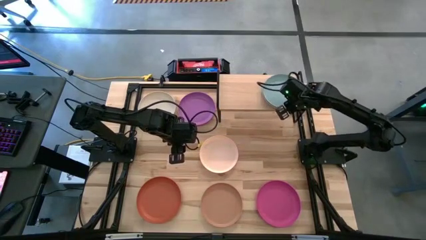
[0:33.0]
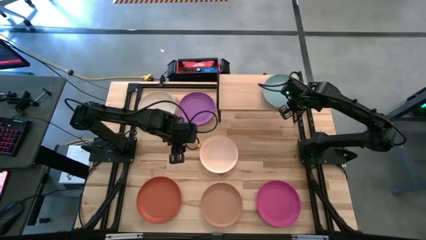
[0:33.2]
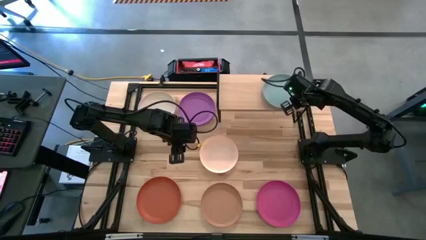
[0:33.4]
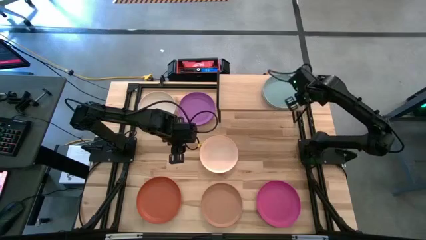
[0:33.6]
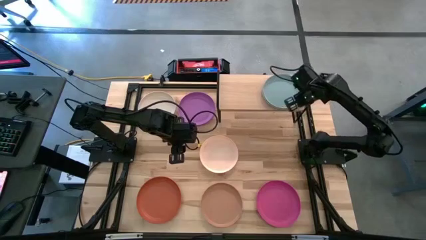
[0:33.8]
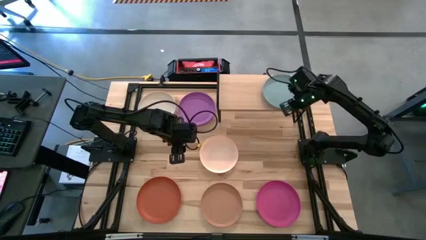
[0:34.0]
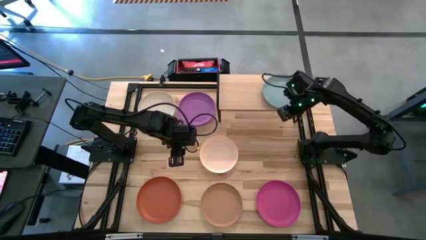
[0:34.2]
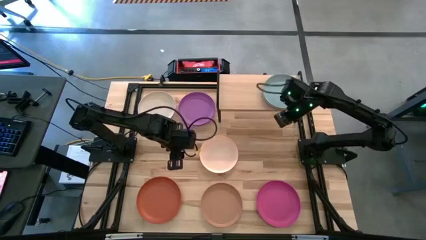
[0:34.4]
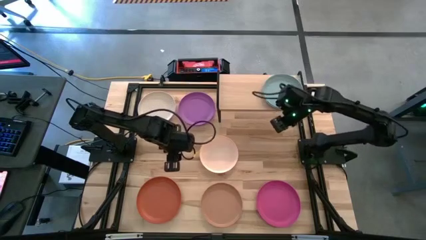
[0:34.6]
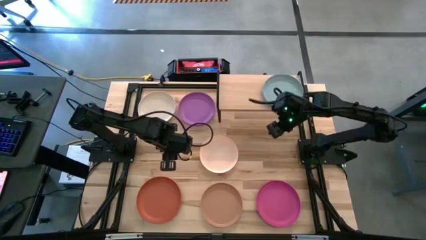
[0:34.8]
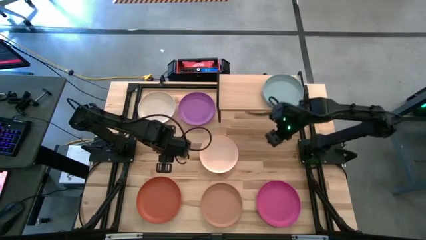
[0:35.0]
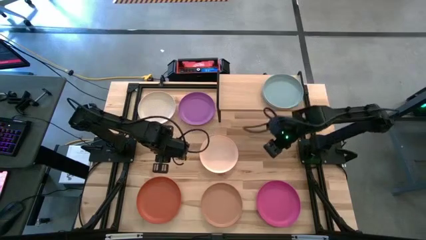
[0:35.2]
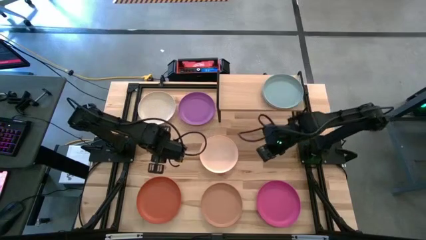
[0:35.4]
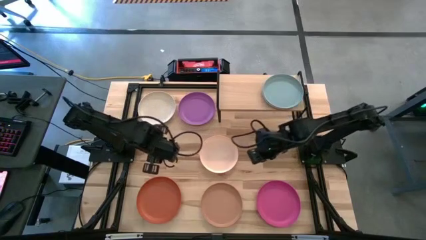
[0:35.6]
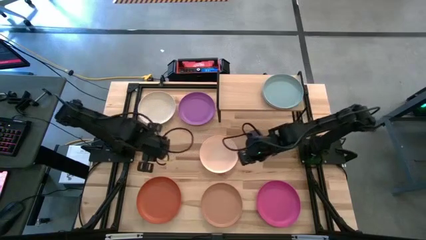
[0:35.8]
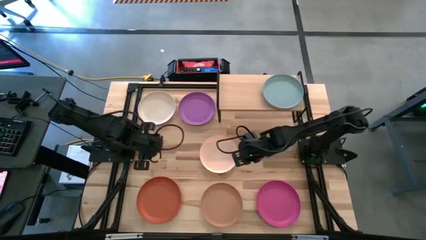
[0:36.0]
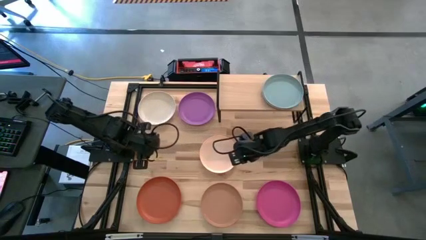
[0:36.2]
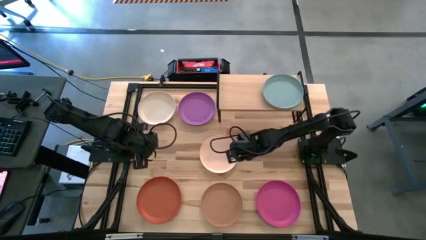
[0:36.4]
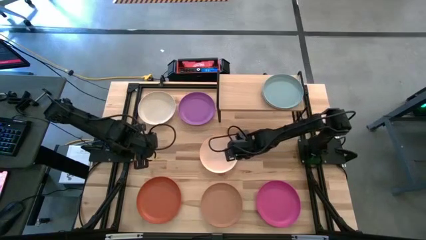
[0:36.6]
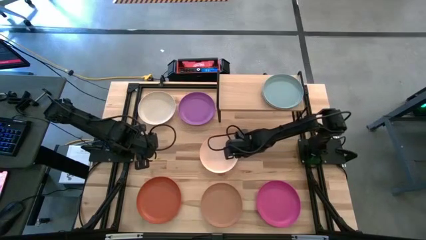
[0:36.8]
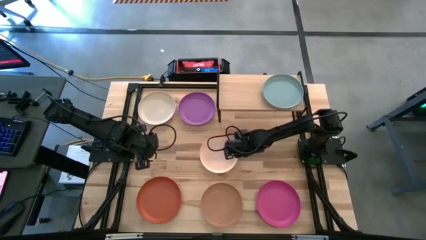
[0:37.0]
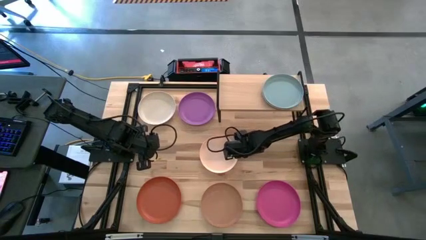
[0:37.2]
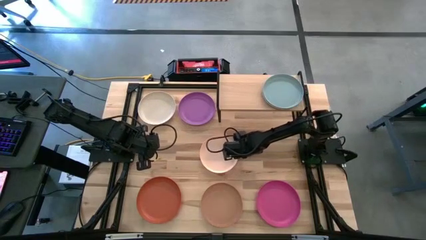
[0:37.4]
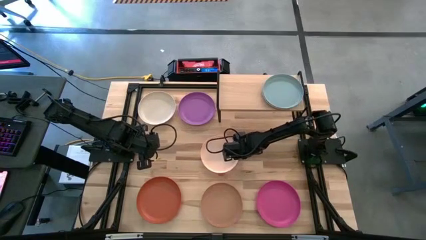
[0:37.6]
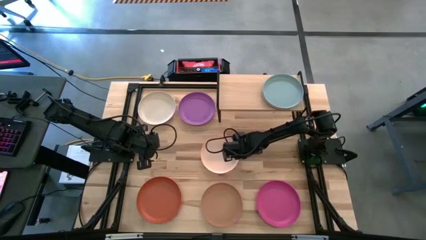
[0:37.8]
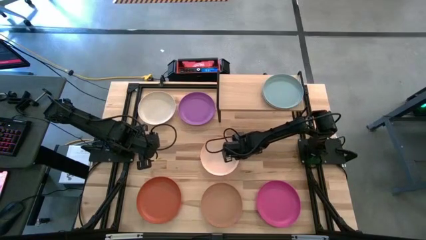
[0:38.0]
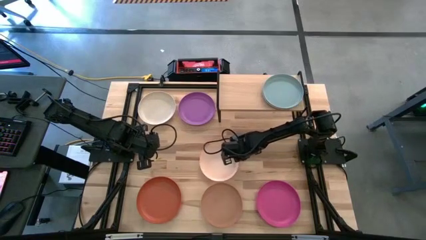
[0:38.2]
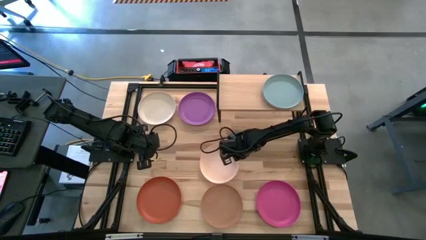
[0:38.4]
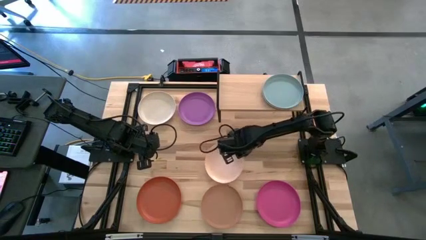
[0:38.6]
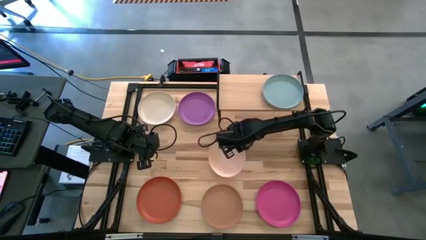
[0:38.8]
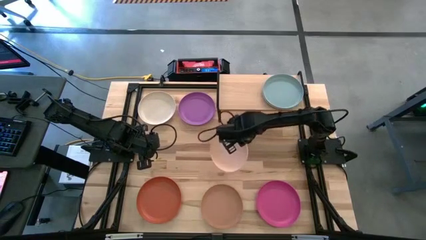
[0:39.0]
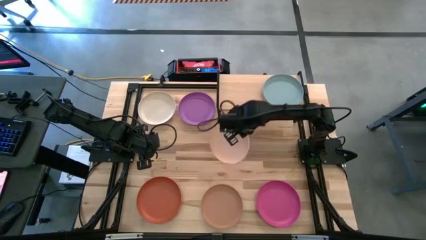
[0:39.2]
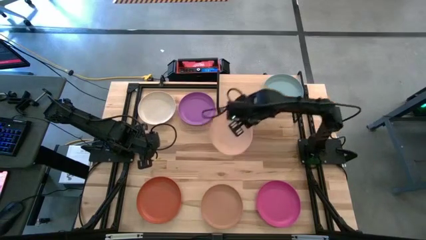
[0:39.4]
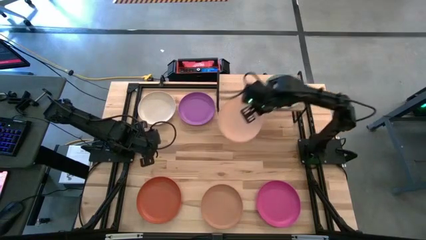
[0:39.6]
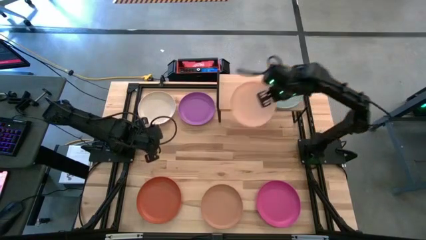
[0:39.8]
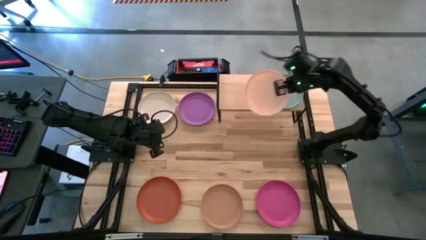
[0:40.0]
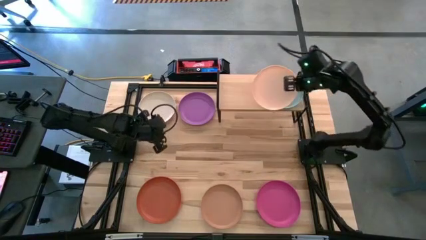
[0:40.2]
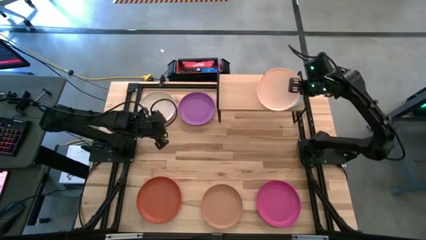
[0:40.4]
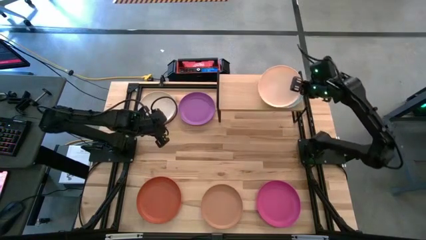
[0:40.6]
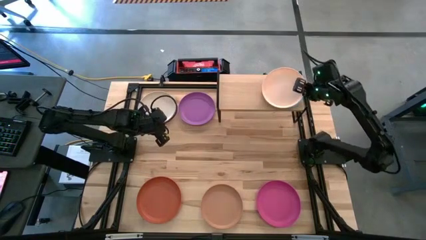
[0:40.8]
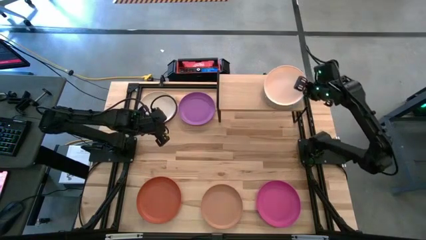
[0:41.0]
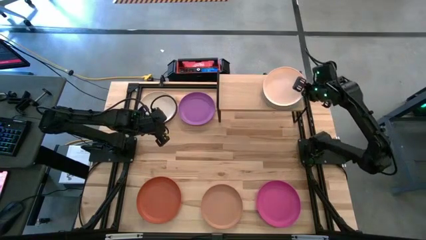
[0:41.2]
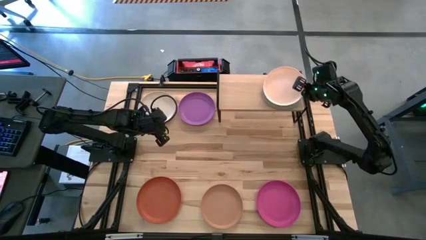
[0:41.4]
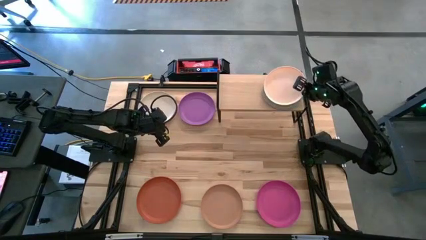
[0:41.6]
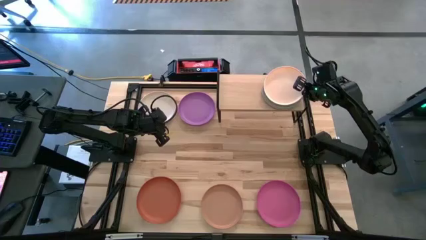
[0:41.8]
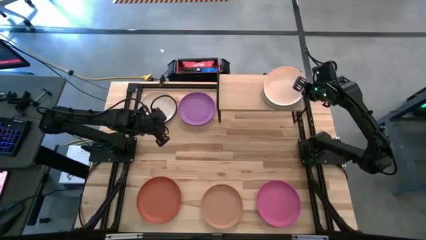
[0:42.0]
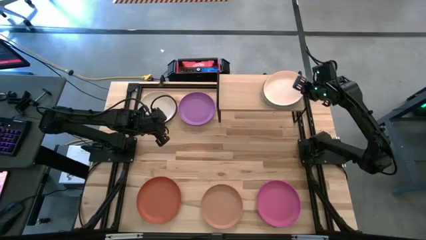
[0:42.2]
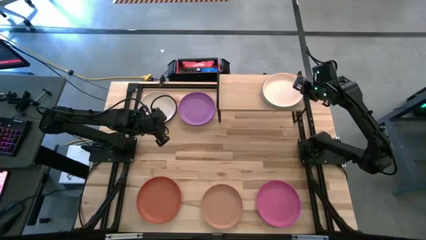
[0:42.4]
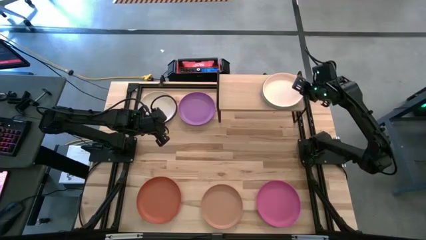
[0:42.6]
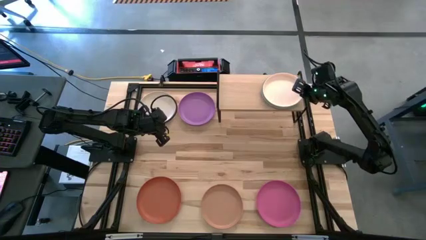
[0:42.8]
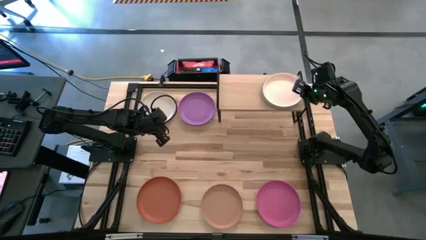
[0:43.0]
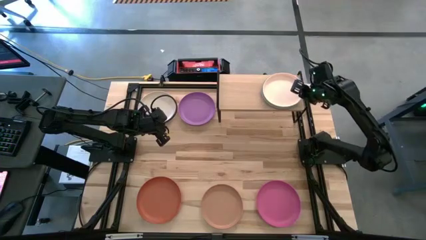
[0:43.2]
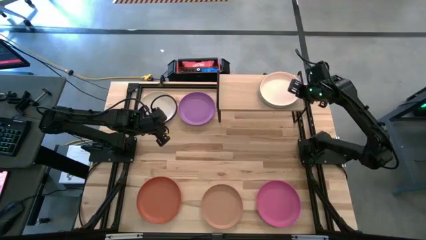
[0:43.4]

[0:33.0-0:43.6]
Task: Place and stack plates onto a shelf
Stack the light orange plate on top of the blue stacked plates on the shelf
